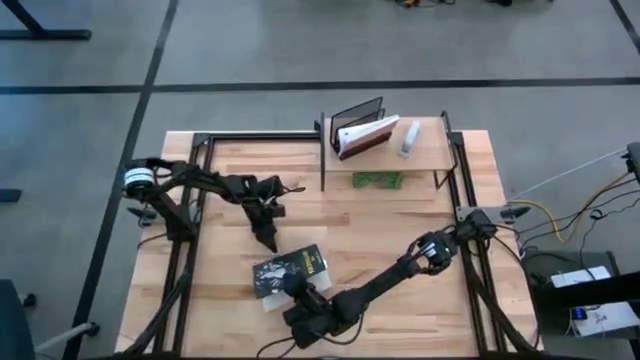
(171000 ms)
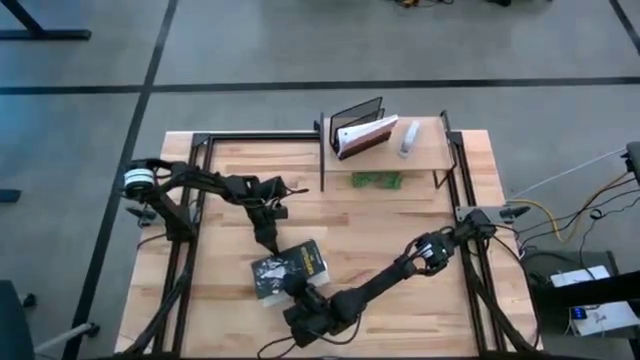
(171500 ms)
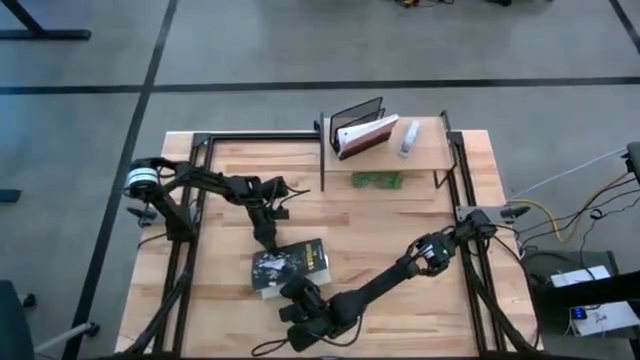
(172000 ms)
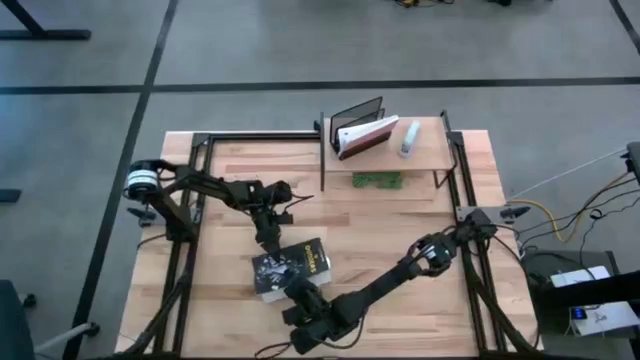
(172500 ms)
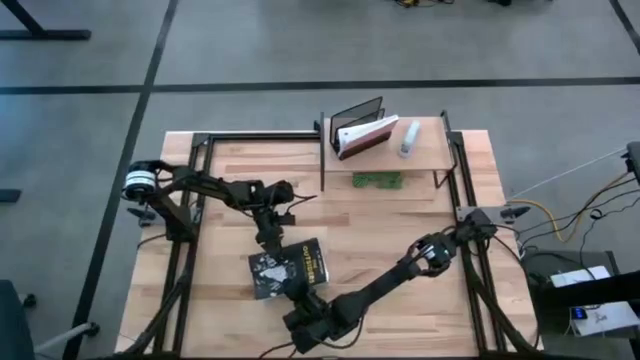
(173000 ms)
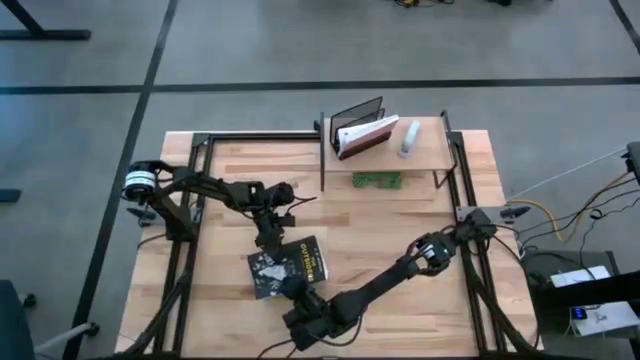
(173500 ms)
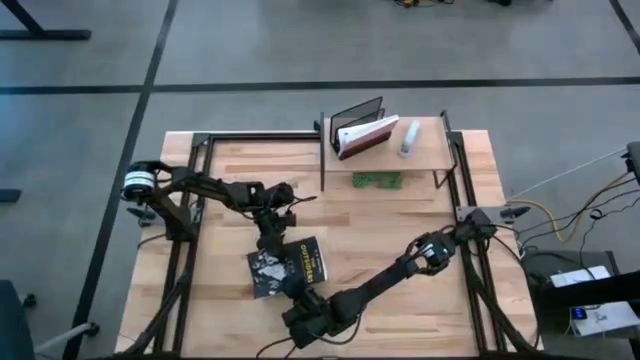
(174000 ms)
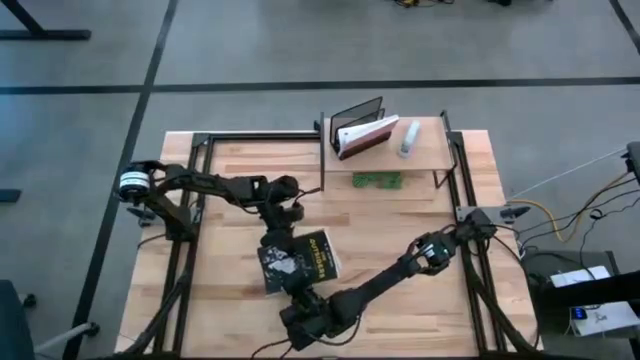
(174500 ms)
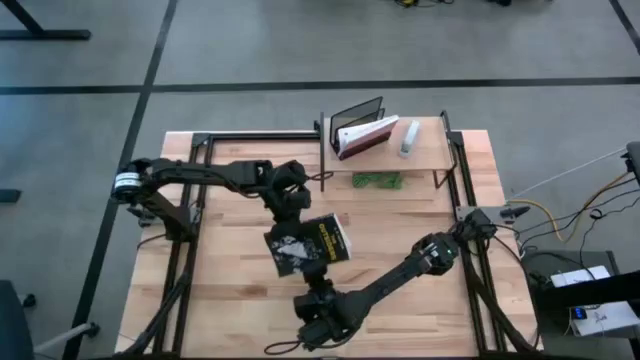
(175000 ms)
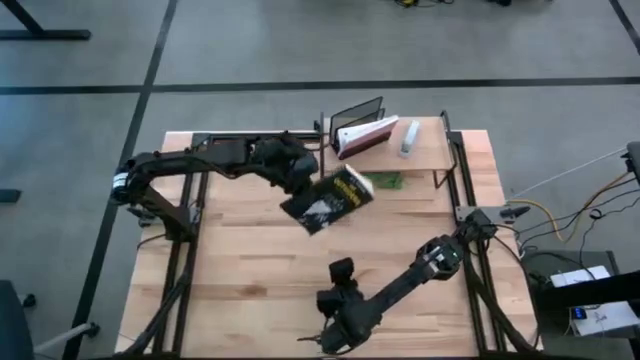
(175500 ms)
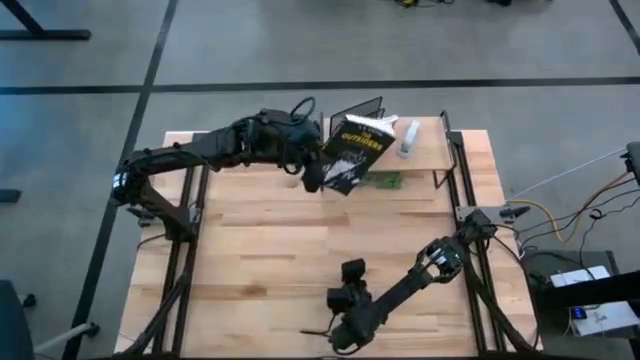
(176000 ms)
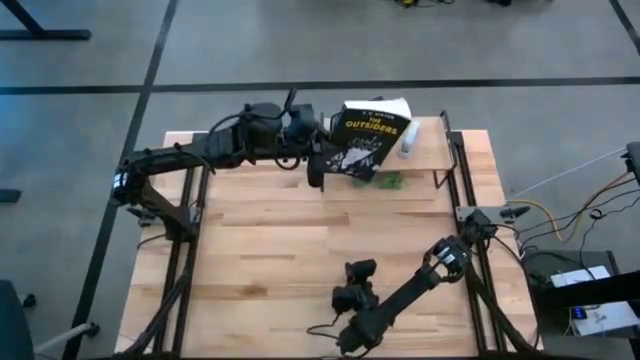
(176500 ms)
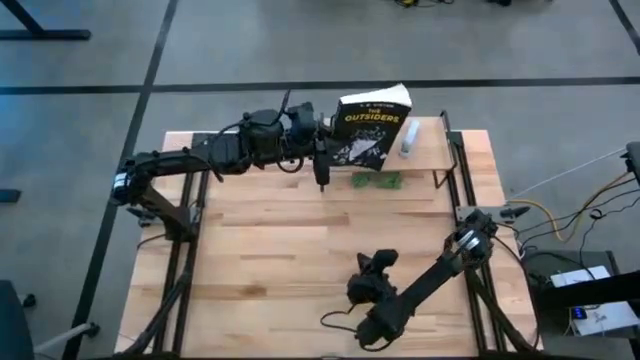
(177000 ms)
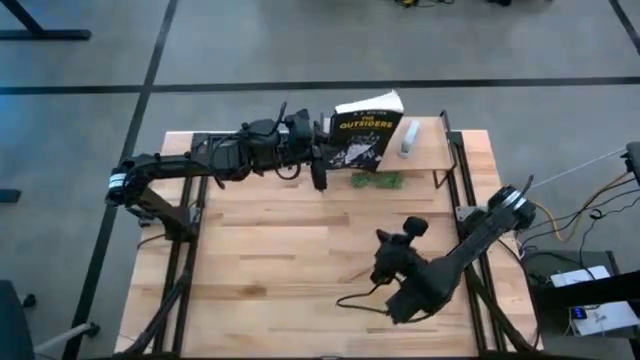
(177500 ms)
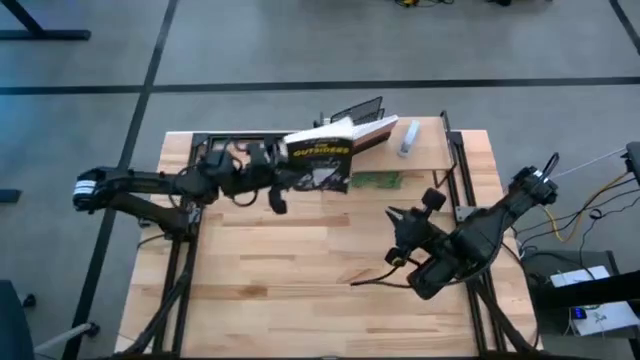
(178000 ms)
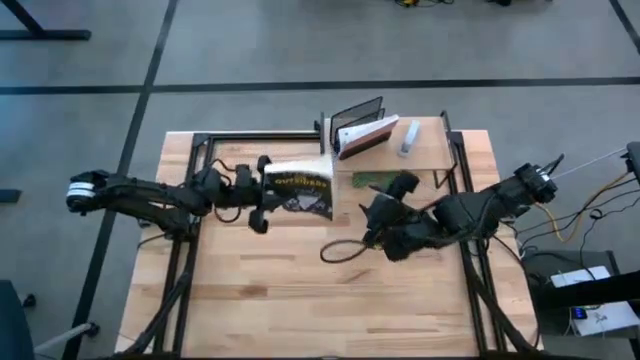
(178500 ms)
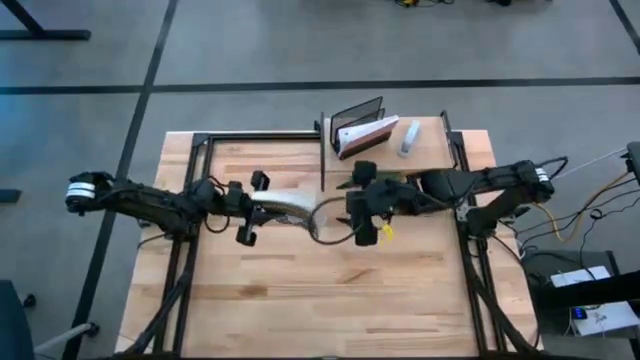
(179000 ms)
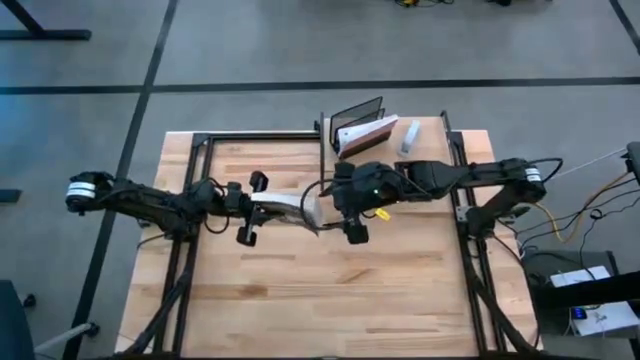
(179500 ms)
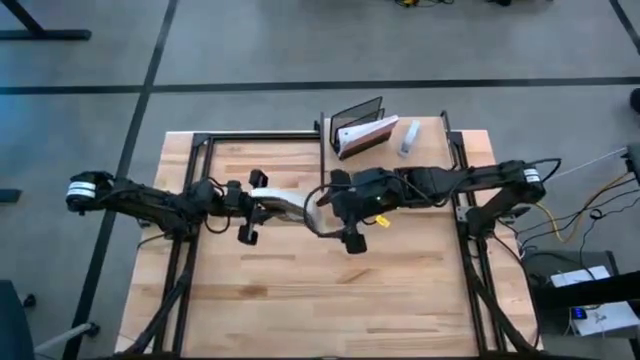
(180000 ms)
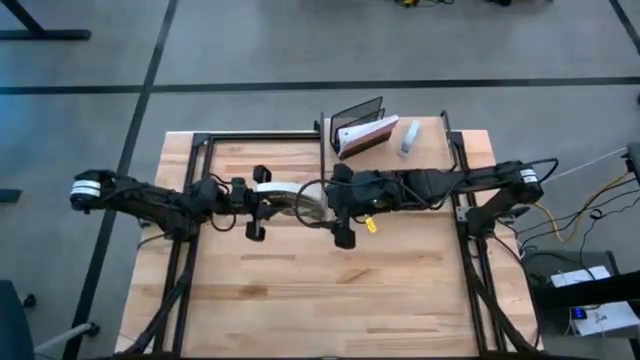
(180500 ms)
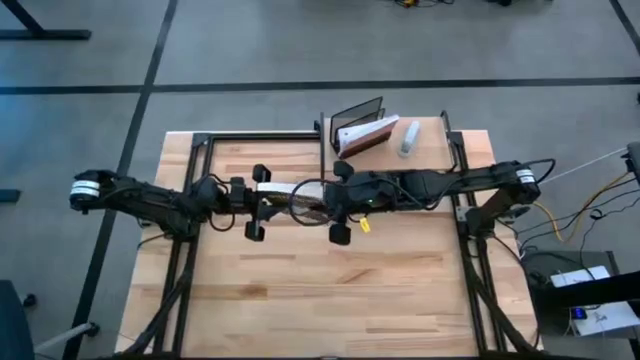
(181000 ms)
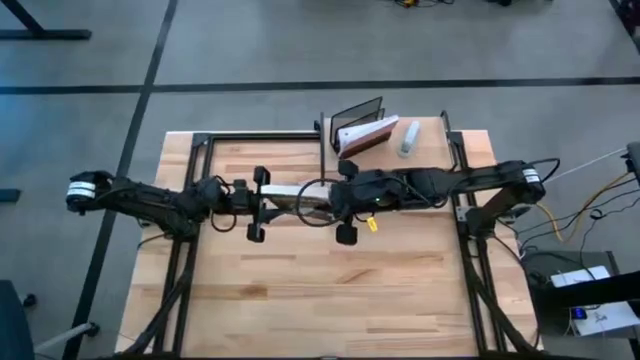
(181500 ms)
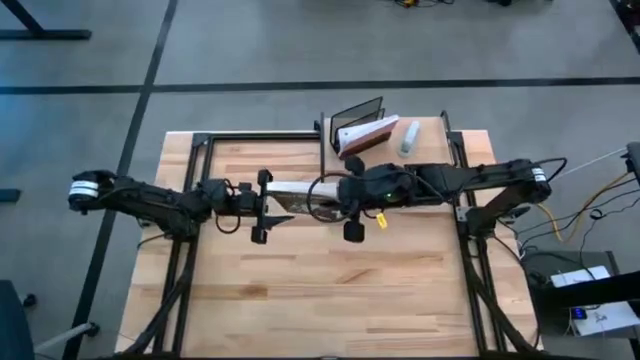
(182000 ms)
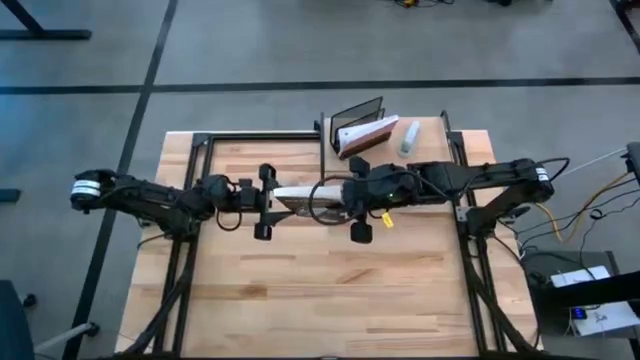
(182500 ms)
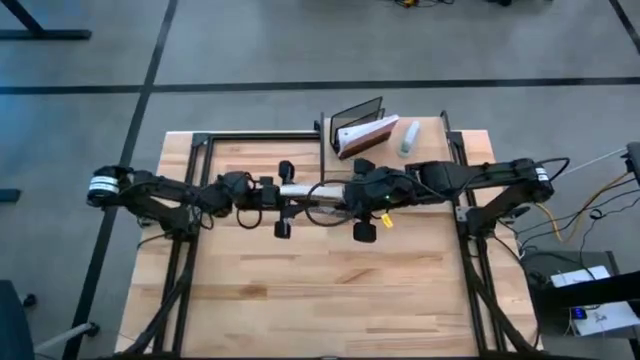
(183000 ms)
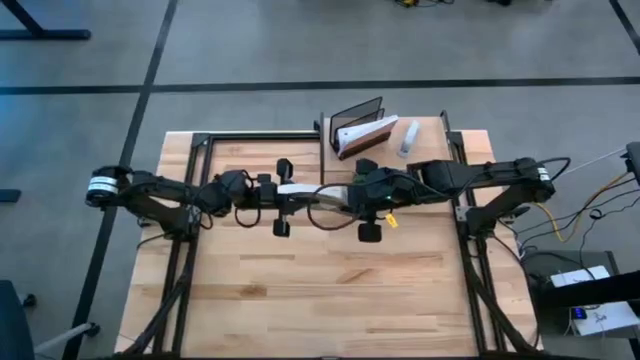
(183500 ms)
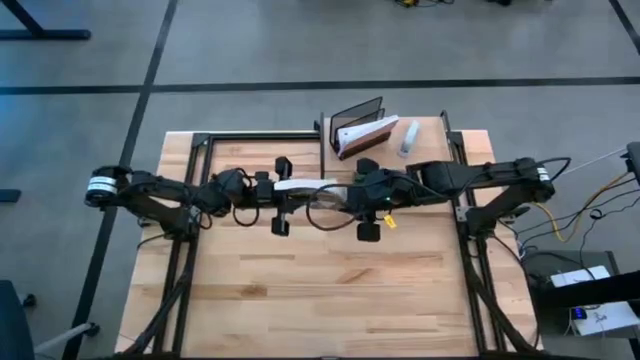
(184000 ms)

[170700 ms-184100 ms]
Task: Stock shelves
Put the black book into the black desk organizer on the shelf

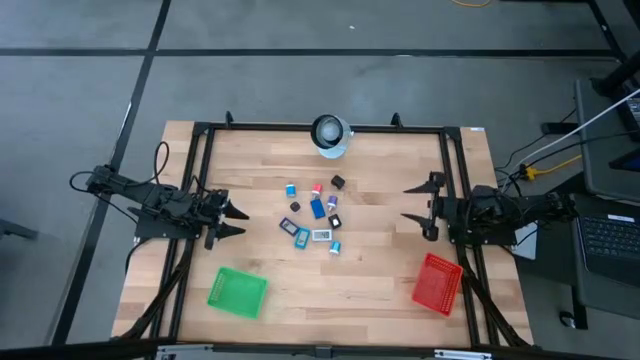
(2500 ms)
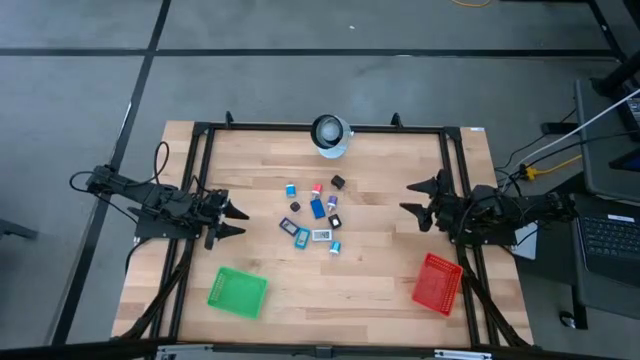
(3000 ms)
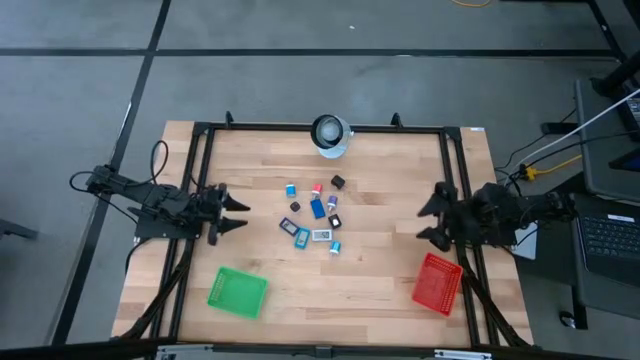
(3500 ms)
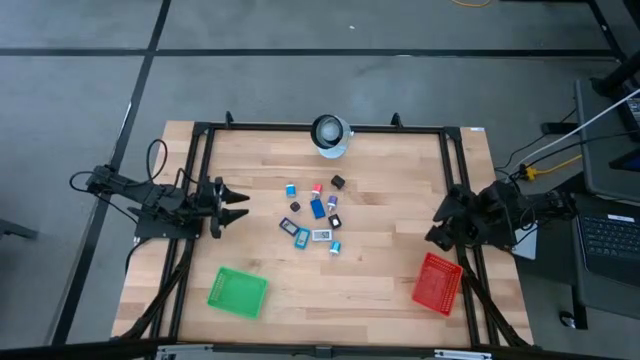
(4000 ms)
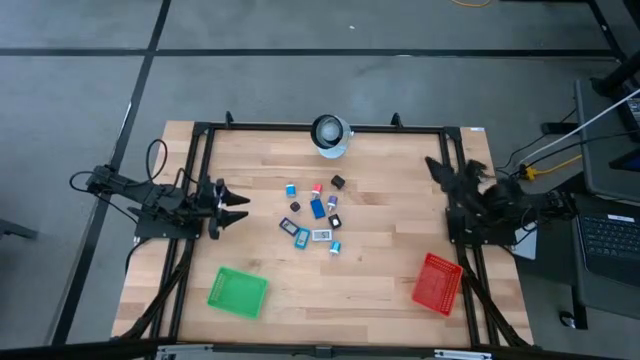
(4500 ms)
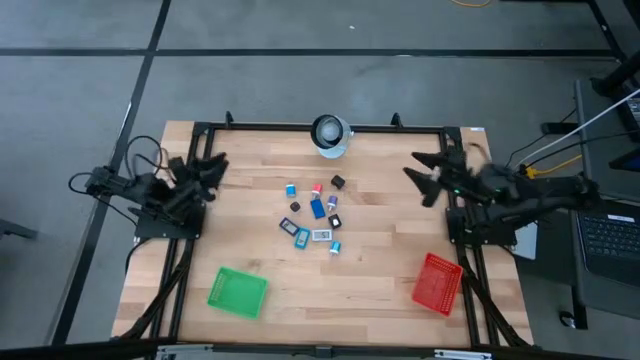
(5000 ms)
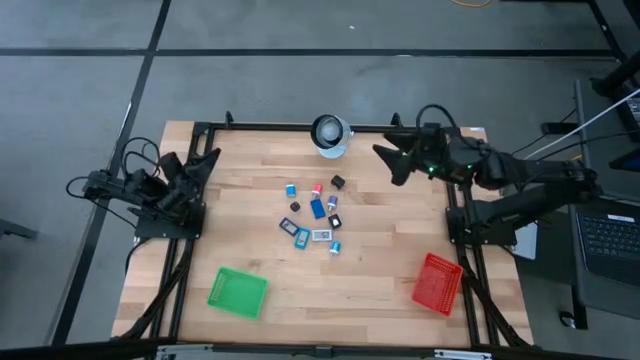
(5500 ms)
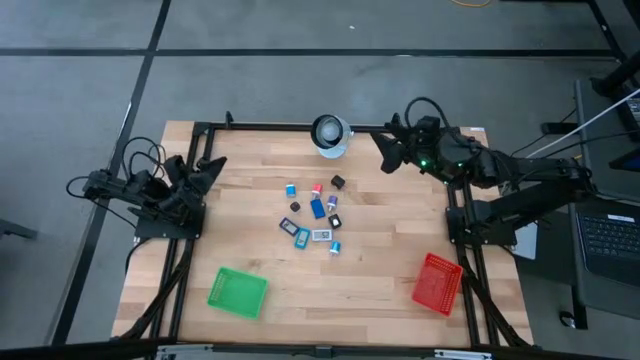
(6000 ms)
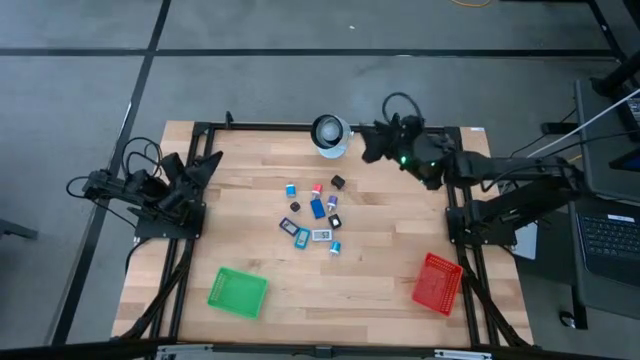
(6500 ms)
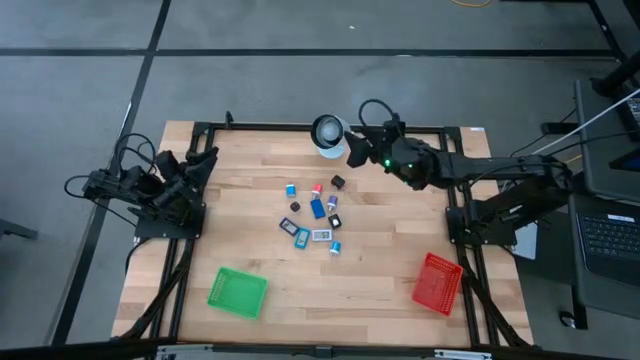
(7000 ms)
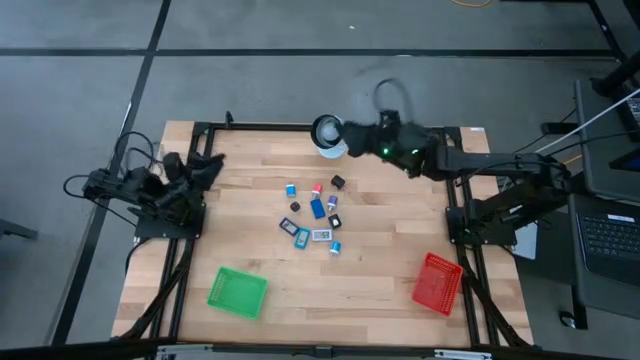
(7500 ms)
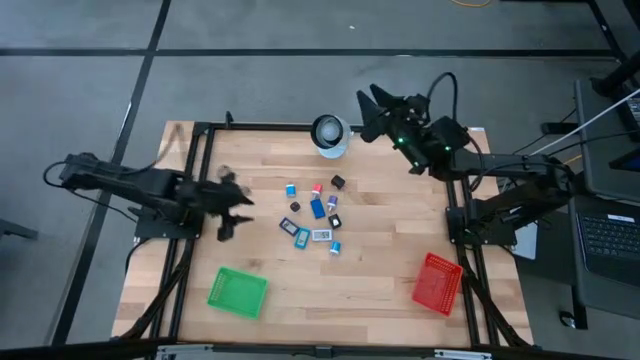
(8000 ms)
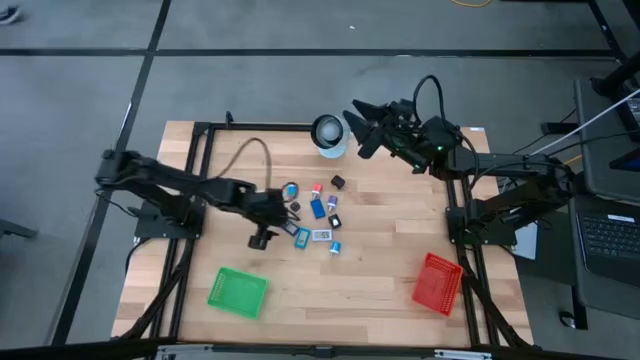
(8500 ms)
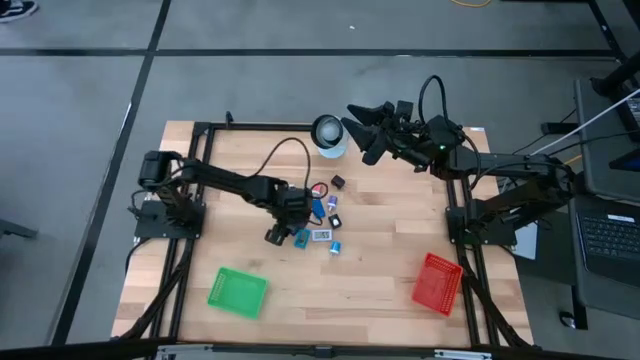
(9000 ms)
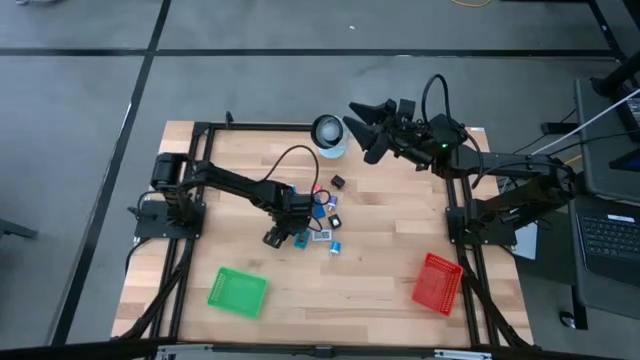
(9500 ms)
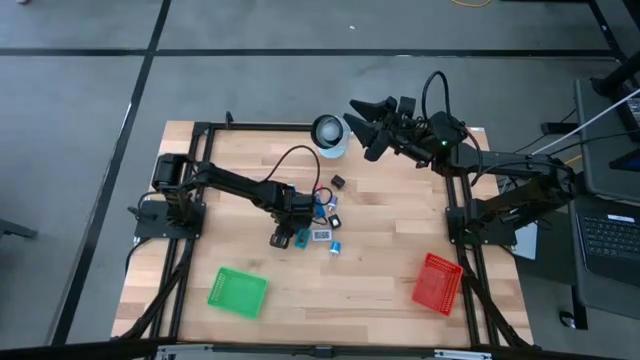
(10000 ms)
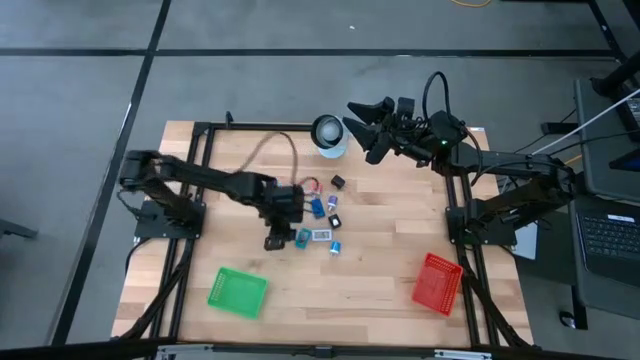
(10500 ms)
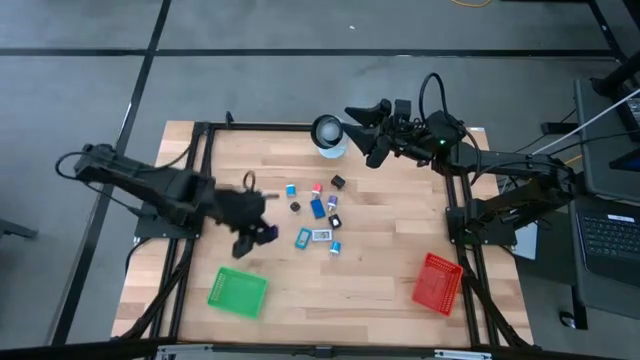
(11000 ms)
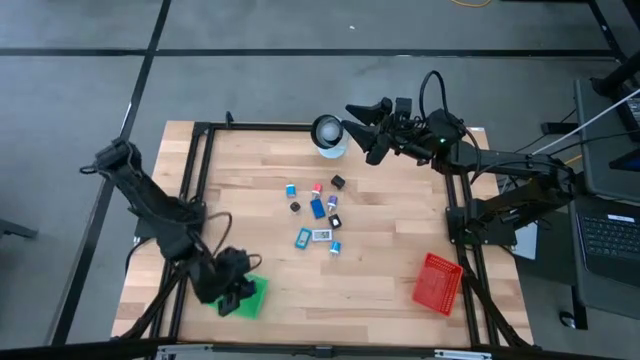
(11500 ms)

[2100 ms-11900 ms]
Task: Pick & Place Office items
Put the purple digital clock into the green bin
